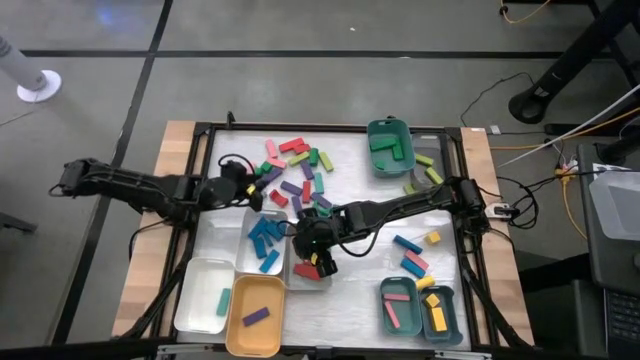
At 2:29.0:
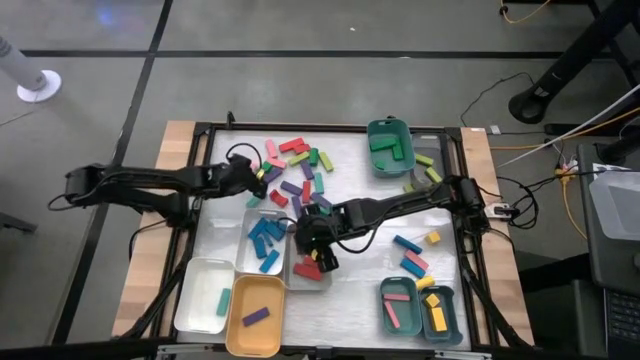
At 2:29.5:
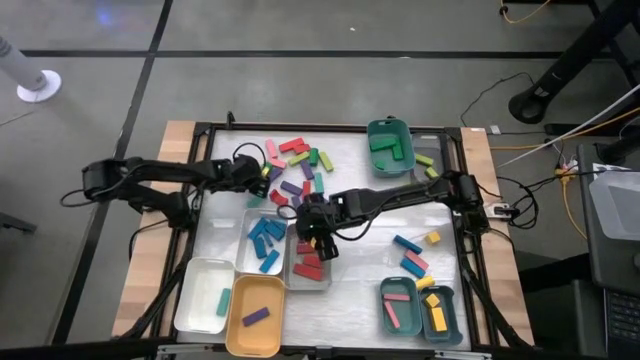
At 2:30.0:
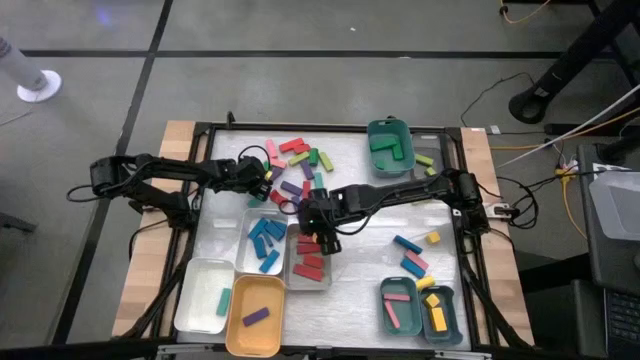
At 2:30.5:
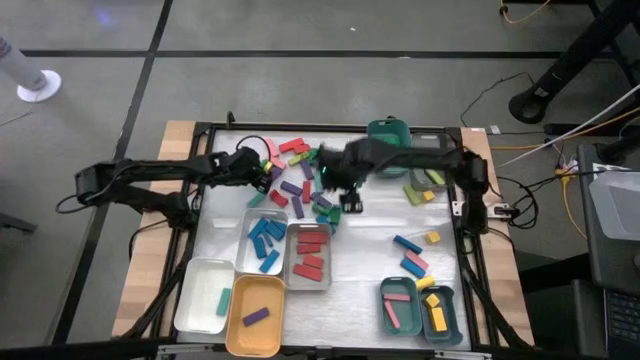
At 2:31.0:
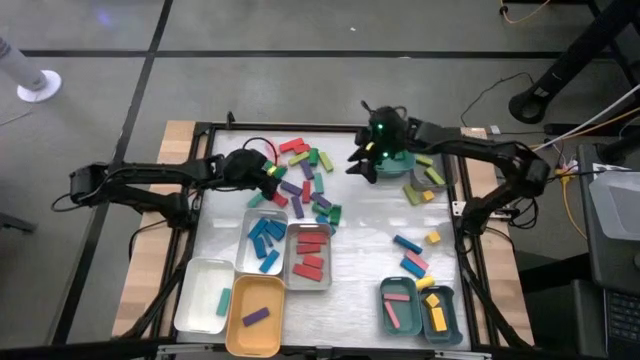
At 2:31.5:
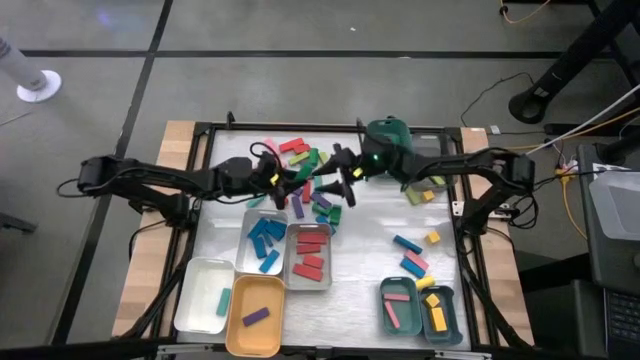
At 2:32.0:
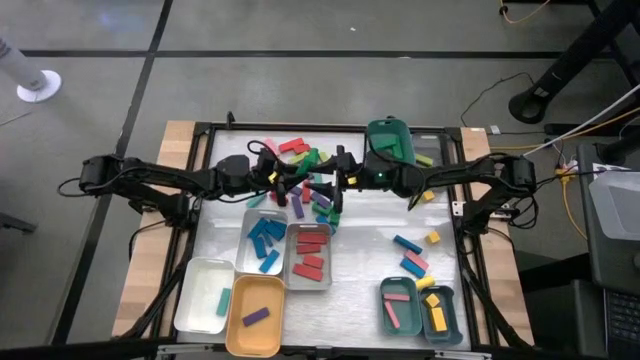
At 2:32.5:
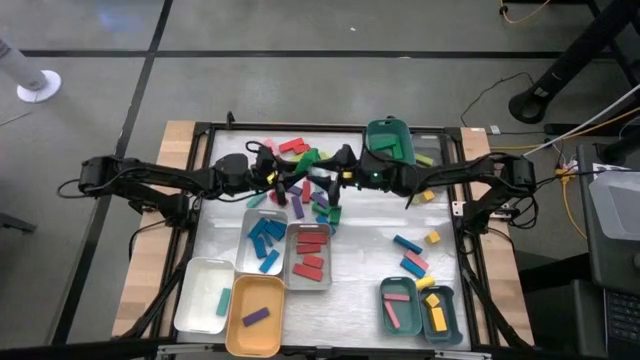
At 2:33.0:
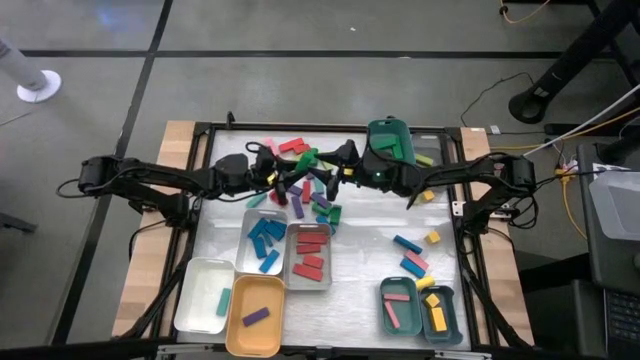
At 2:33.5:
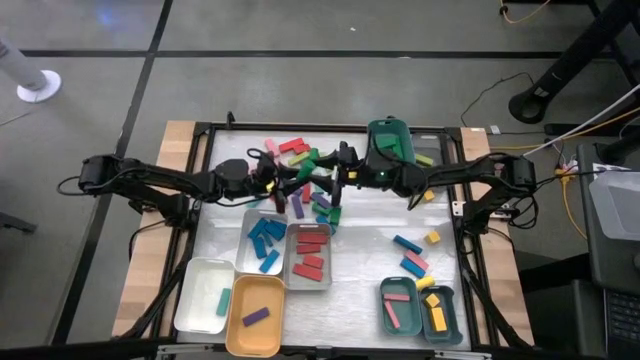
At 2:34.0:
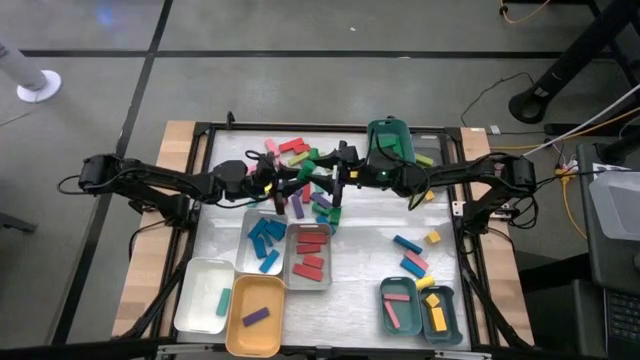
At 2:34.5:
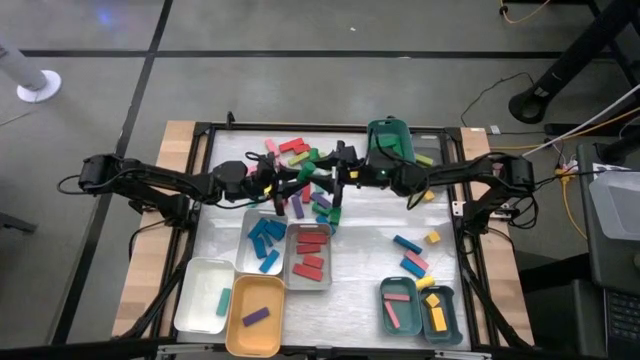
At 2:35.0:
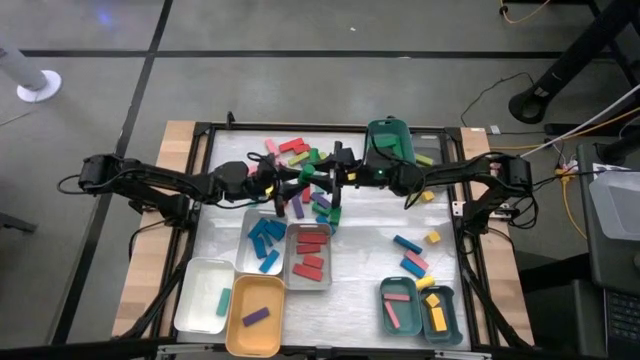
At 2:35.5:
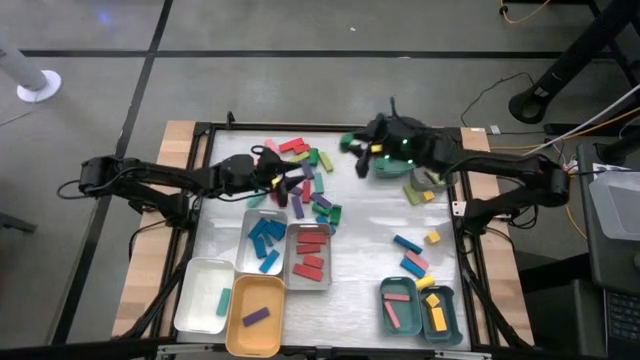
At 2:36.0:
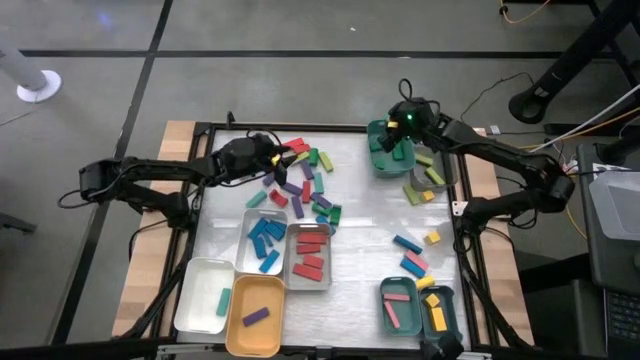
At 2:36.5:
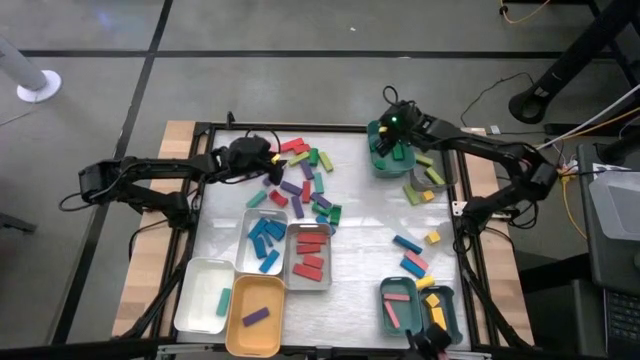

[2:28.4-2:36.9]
Task: Sort blocks
Put the green block into the top green bin

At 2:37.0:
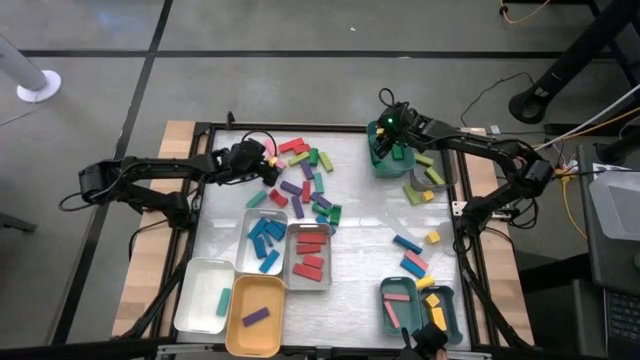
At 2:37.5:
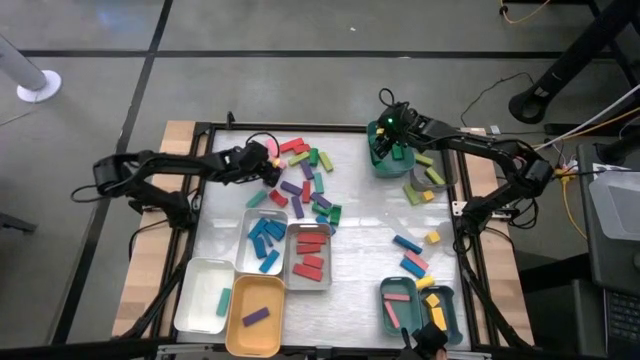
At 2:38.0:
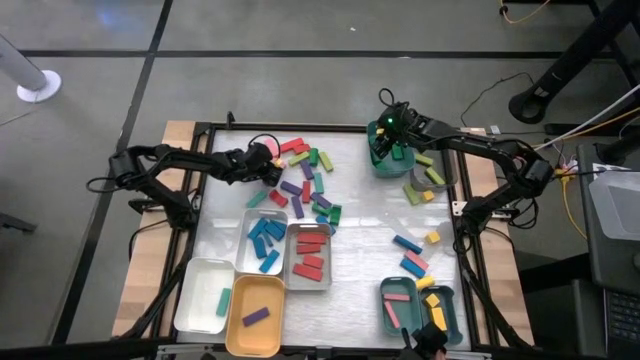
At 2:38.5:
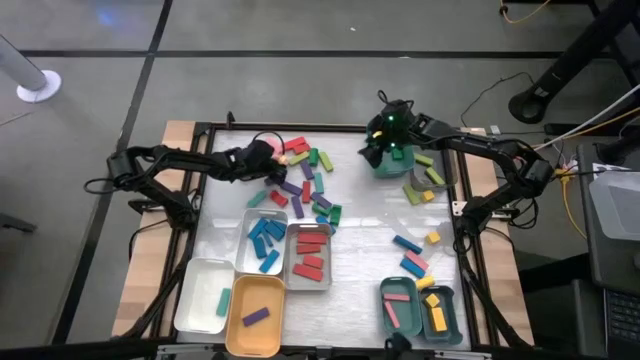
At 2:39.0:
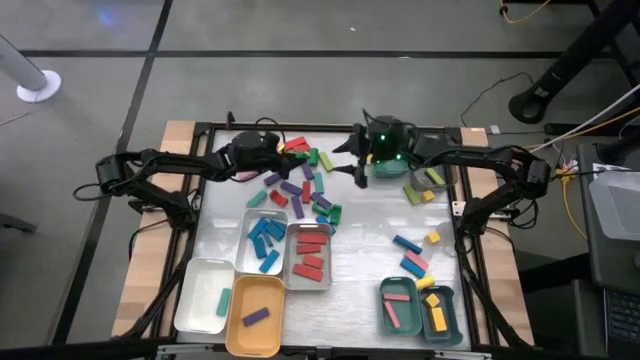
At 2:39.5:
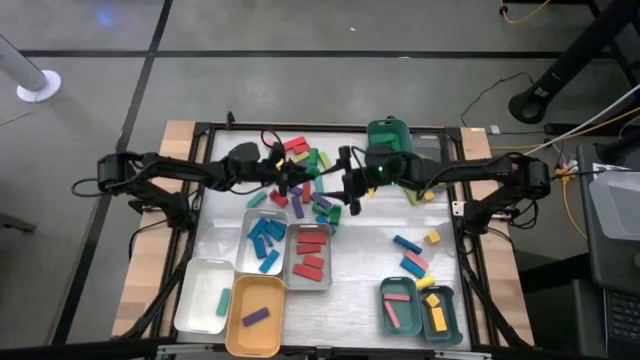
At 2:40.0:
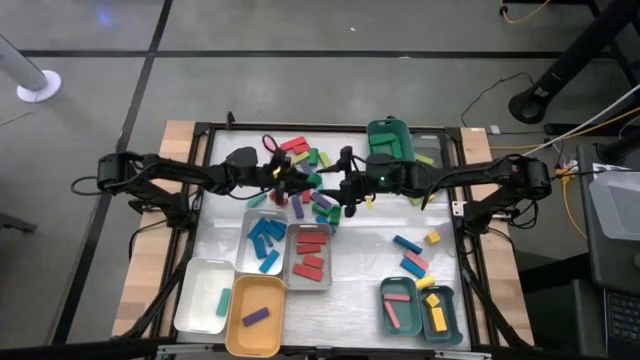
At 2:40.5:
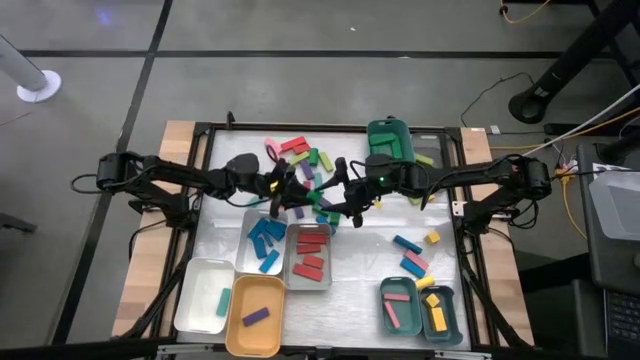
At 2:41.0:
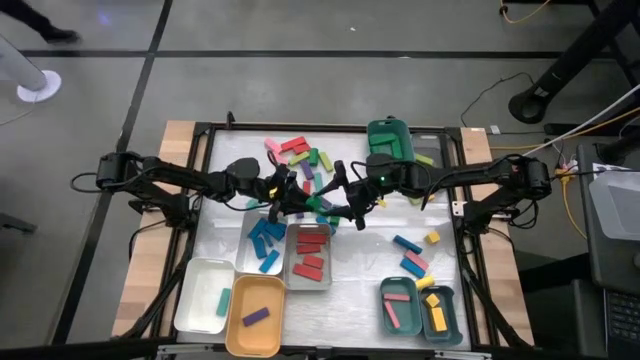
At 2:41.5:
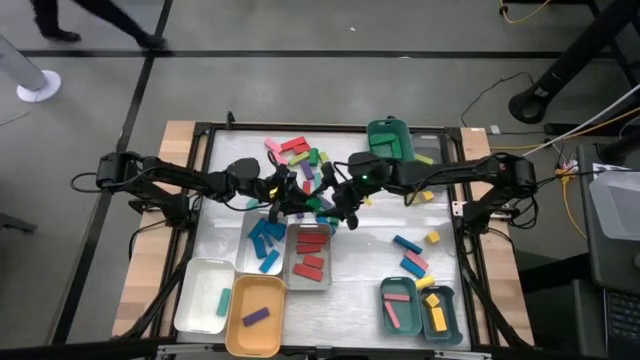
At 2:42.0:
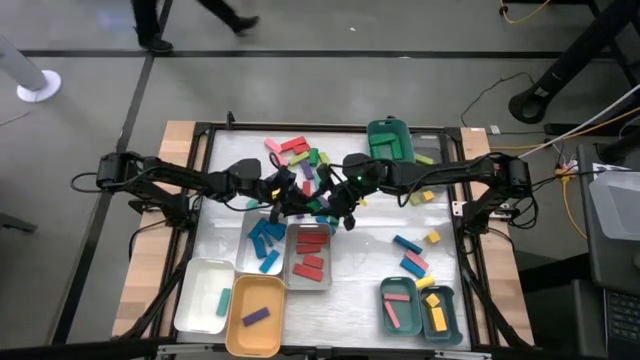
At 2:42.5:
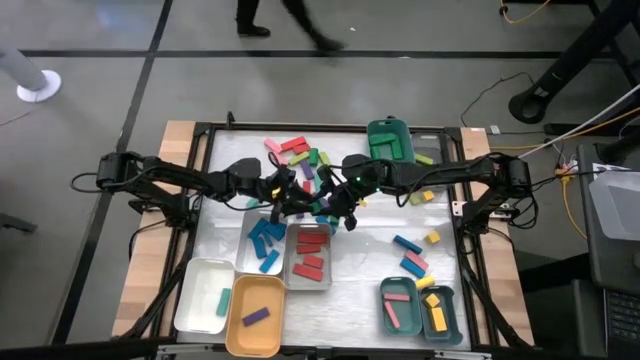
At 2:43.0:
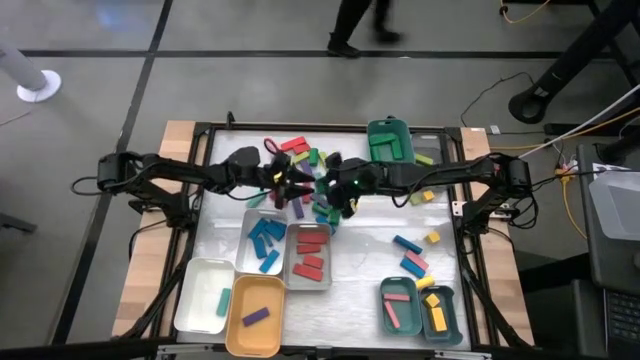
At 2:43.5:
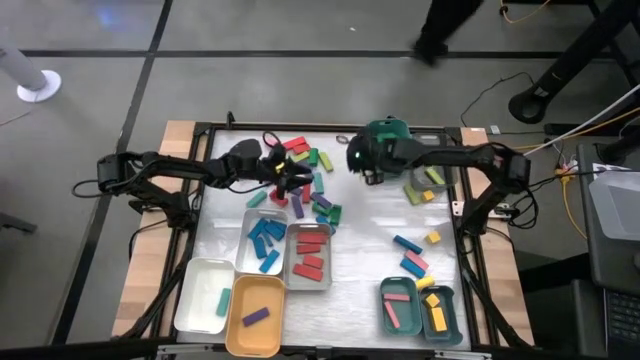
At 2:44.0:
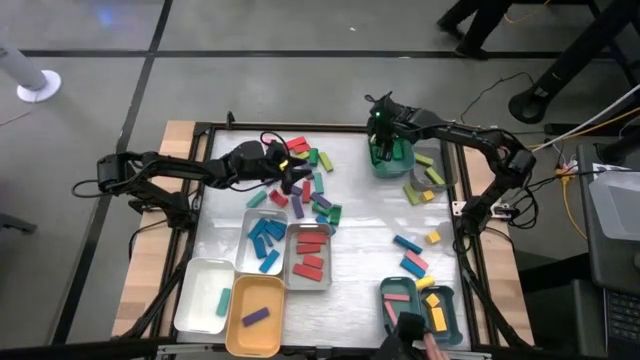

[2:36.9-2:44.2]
Put the green block into the top green bin

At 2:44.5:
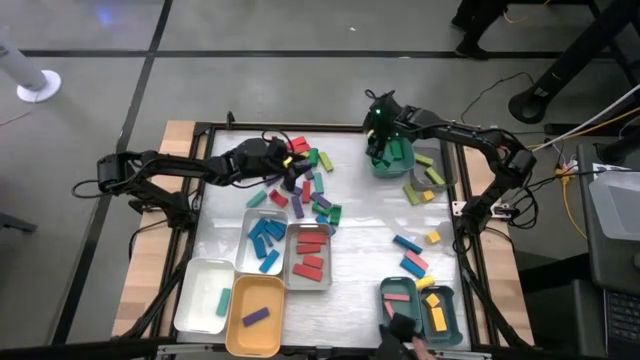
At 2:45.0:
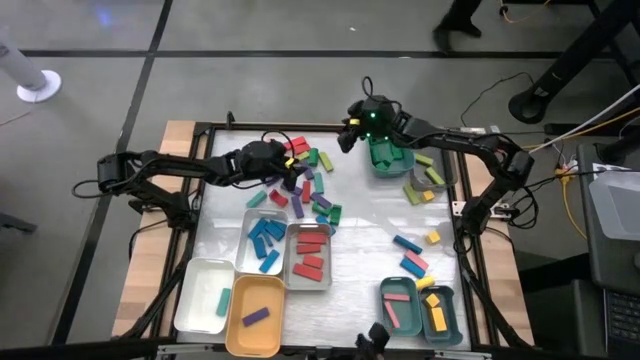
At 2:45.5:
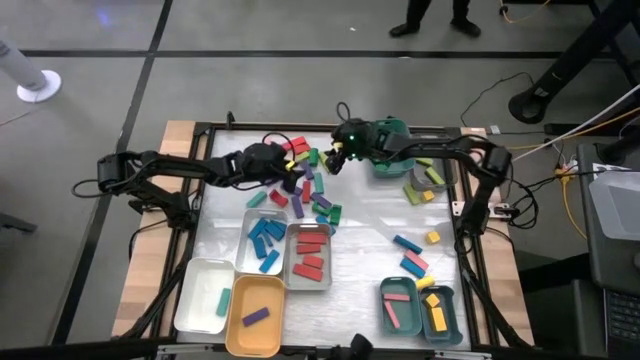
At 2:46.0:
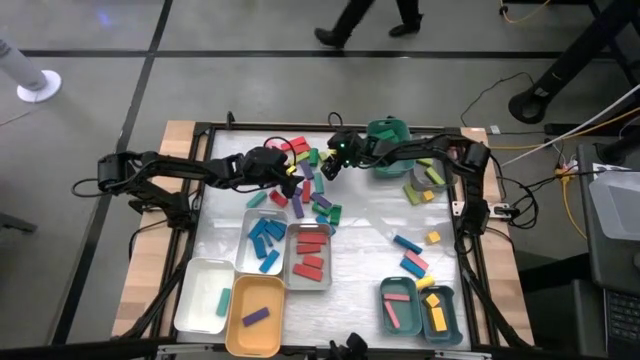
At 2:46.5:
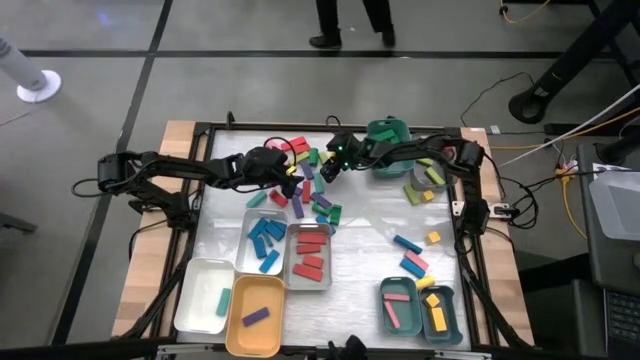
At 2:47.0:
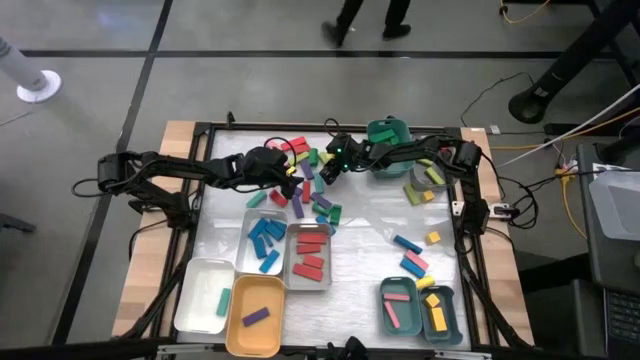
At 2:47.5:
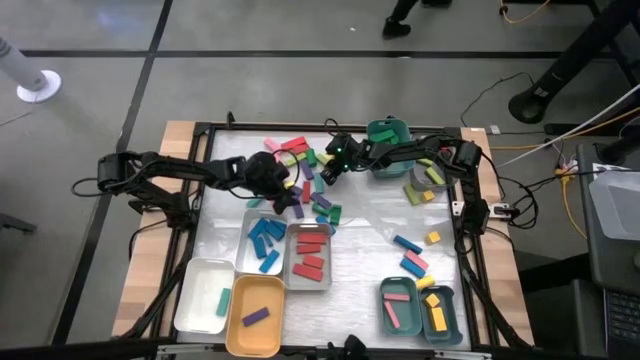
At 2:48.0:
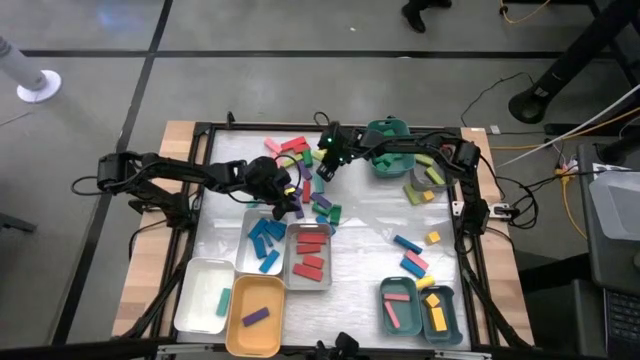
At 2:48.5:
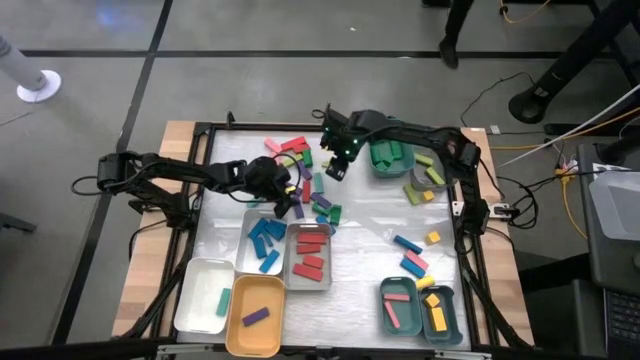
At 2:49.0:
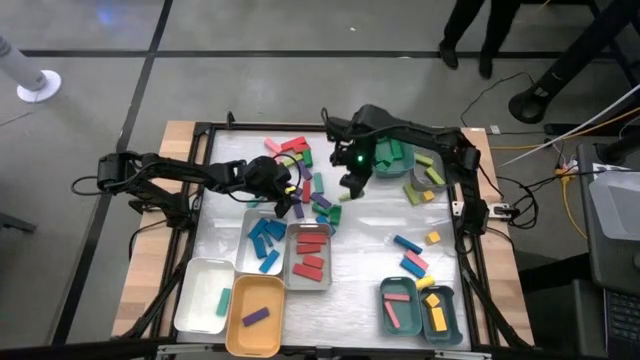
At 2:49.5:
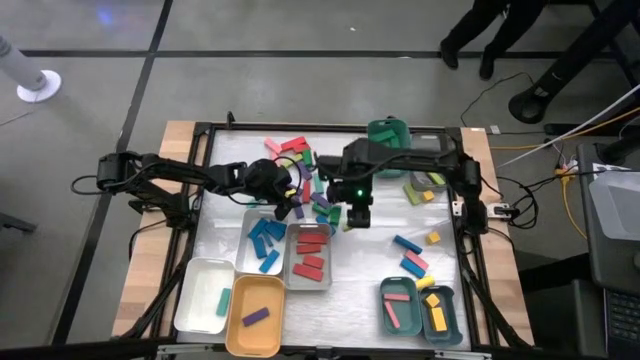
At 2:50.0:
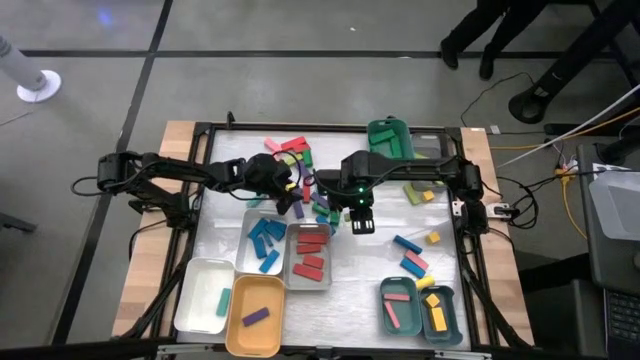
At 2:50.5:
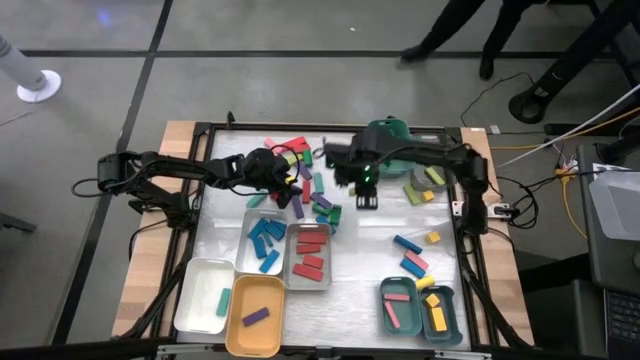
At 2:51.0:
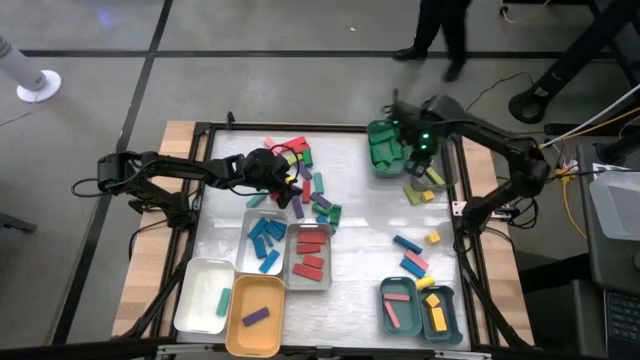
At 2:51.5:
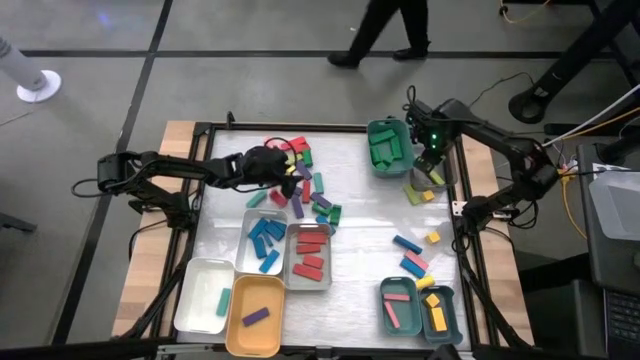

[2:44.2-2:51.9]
Put the light green block into the black bin
